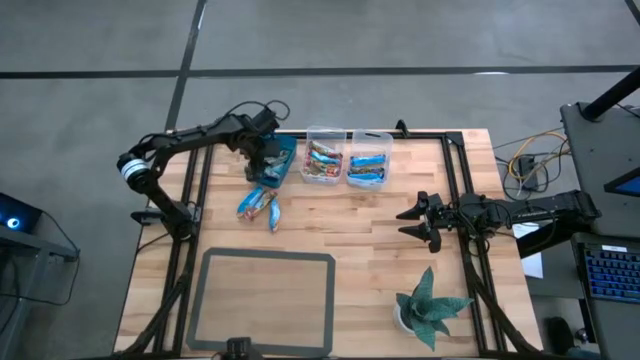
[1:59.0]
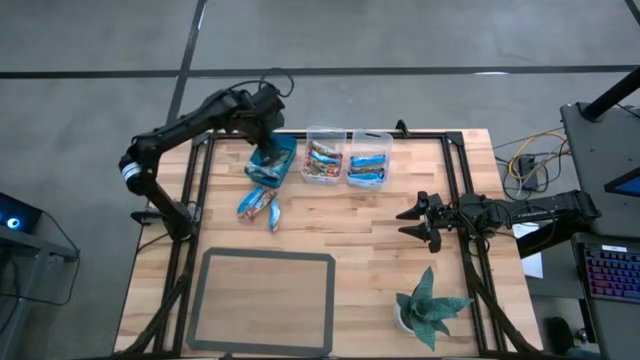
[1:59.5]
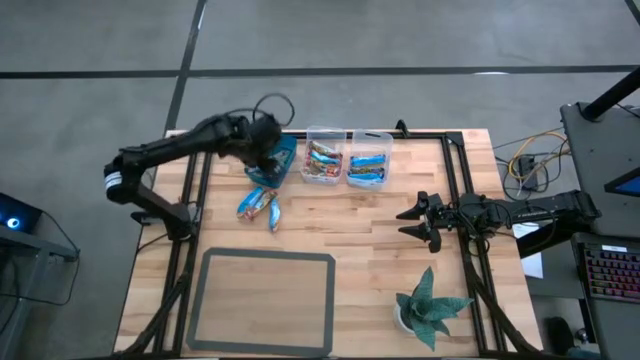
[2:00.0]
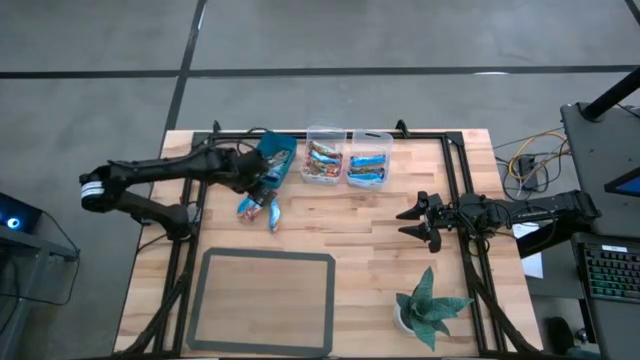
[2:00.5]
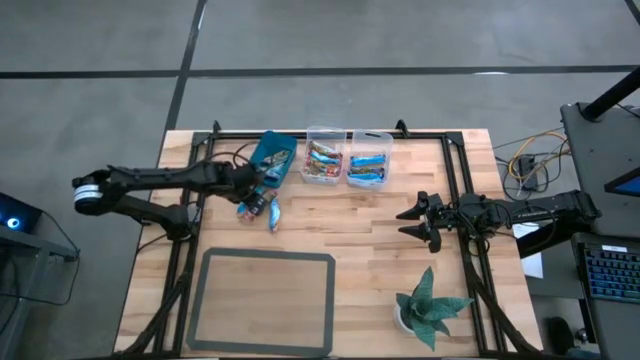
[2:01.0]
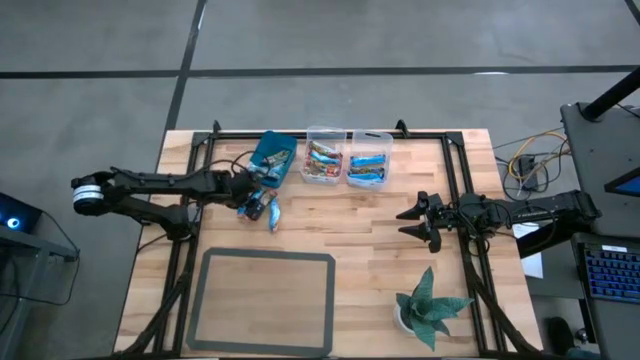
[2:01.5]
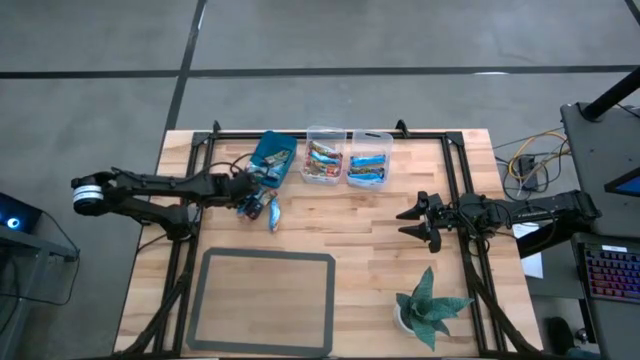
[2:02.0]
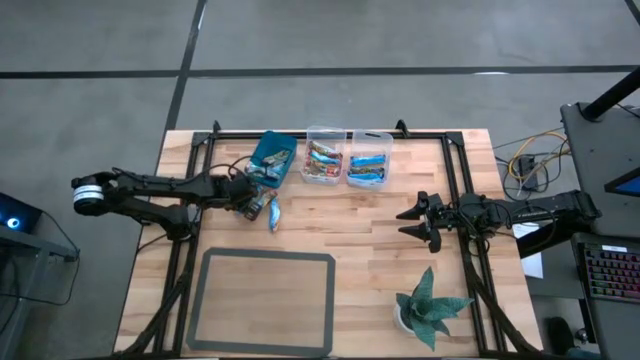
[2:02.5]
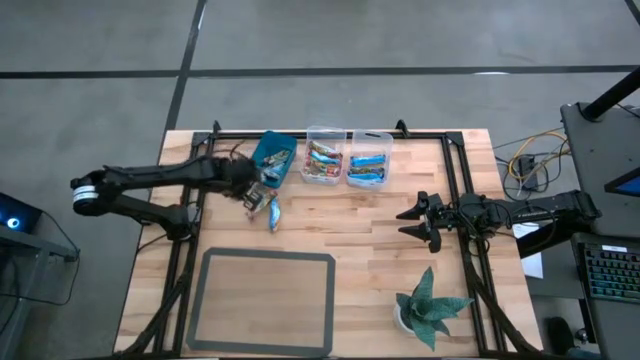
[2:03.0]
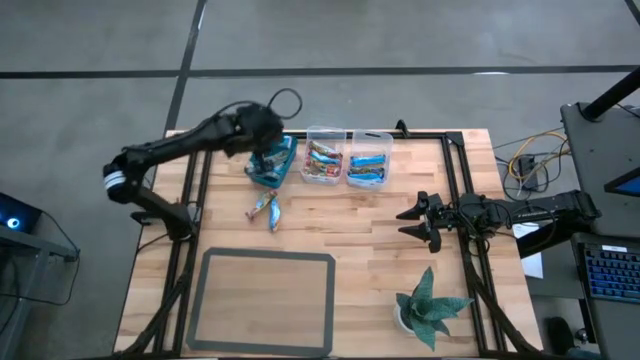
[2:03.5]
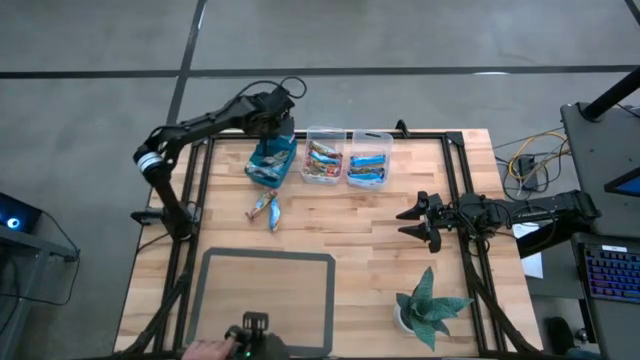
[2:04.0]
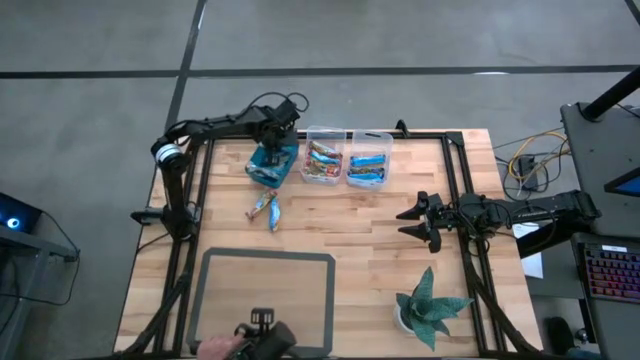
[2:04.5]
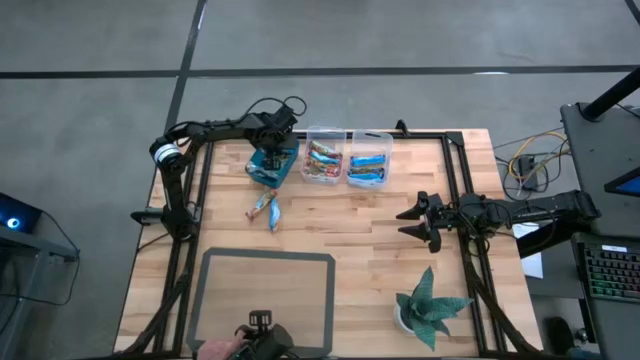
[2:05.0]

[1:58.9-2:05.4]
Task: Pick and place Granola Bars by type
Put the yellow granola bar into the blue bin

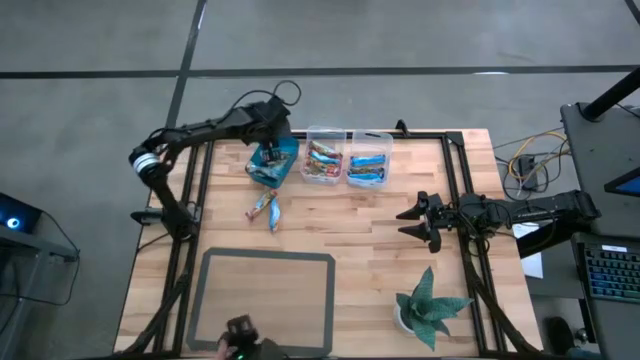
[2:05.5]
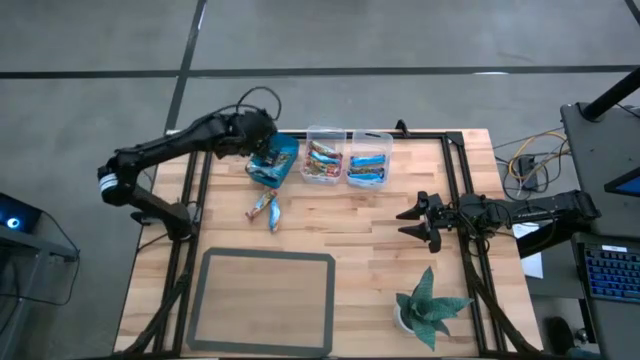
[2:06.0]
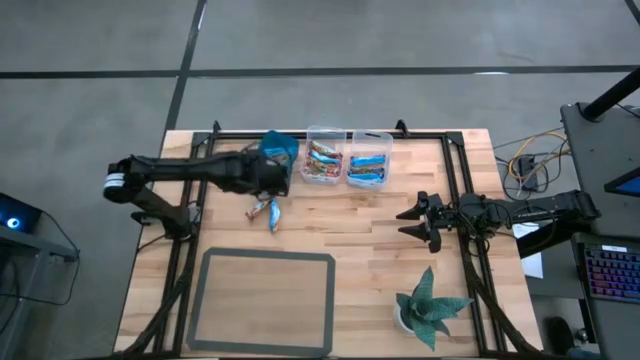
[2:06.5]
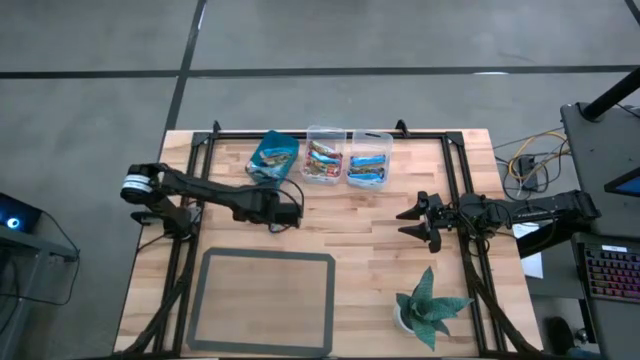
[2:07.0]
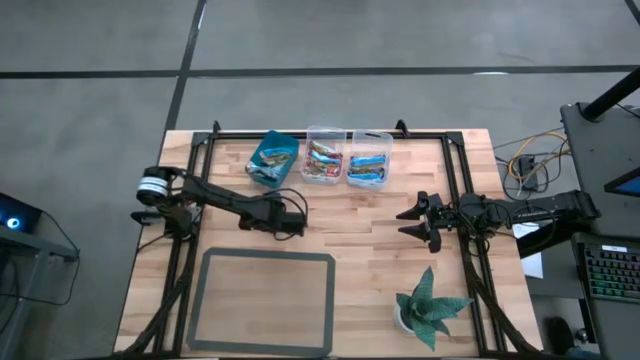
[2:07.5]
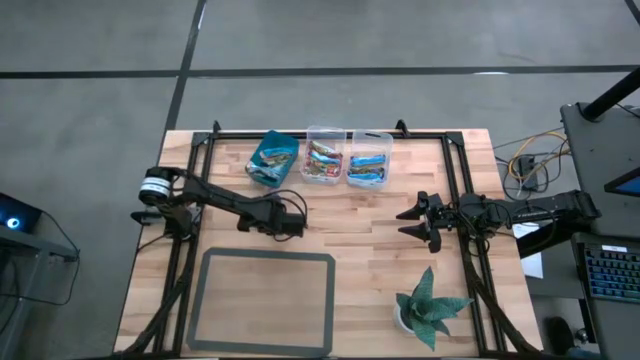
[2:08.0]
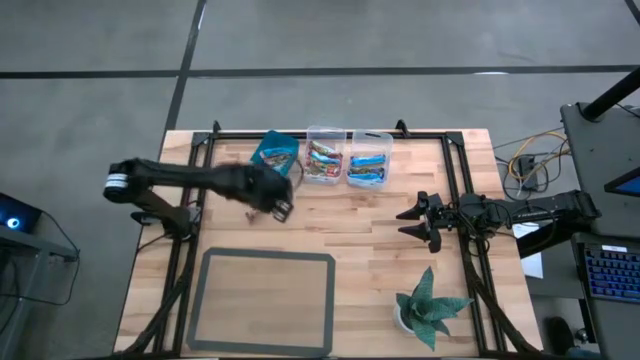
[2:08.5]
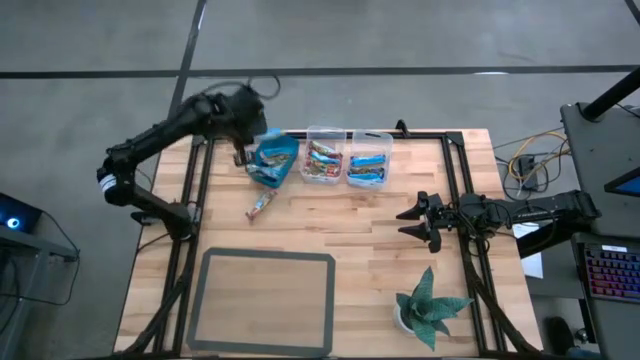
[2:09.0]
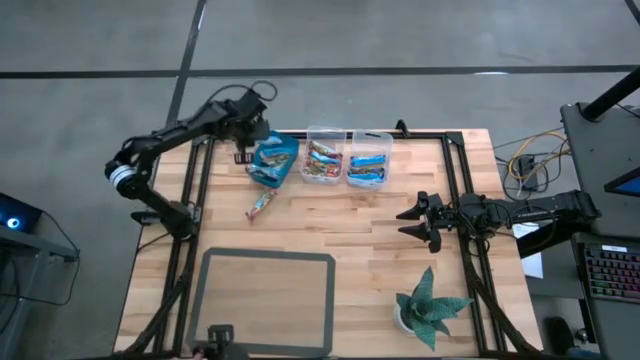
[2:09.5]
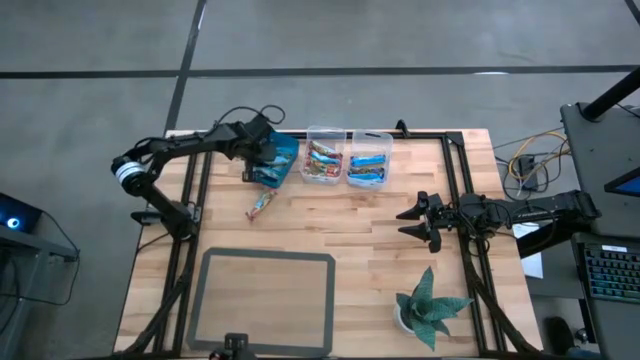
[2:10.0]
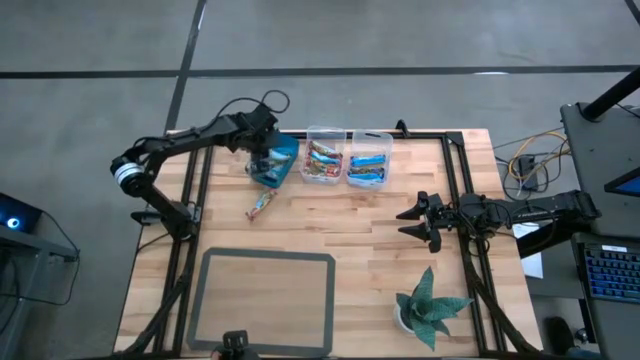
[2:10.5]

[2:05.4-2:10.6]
Put the yellow granola bar into the blue bin

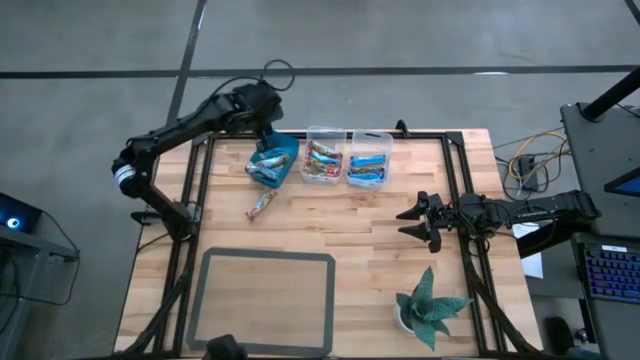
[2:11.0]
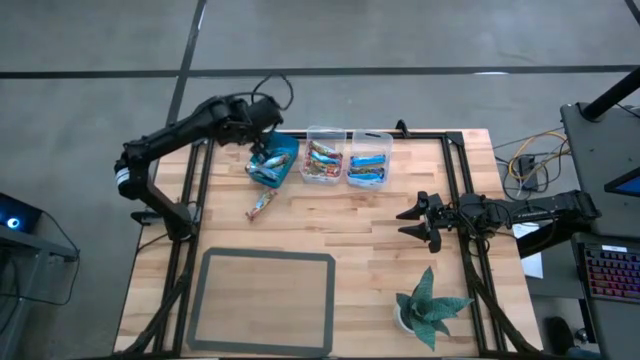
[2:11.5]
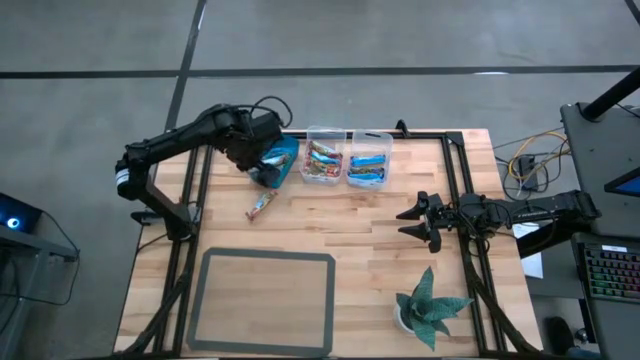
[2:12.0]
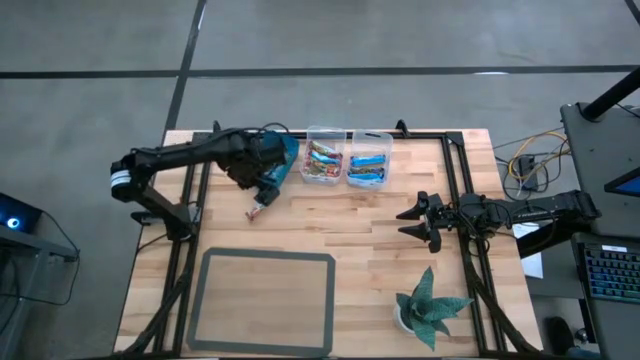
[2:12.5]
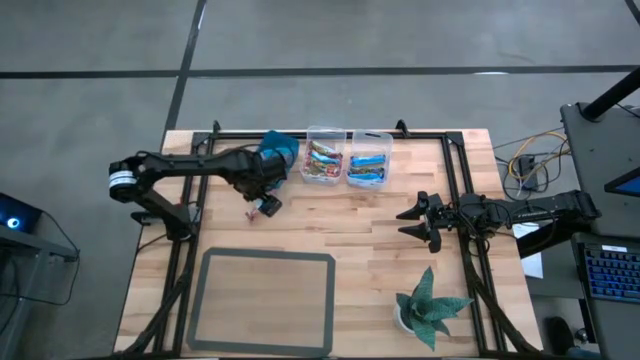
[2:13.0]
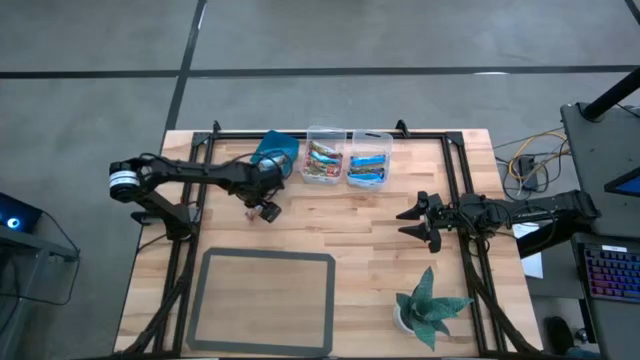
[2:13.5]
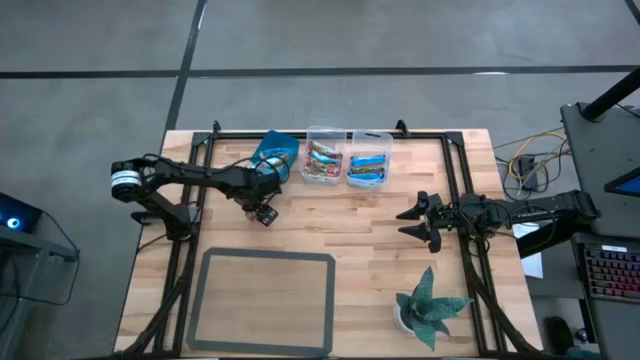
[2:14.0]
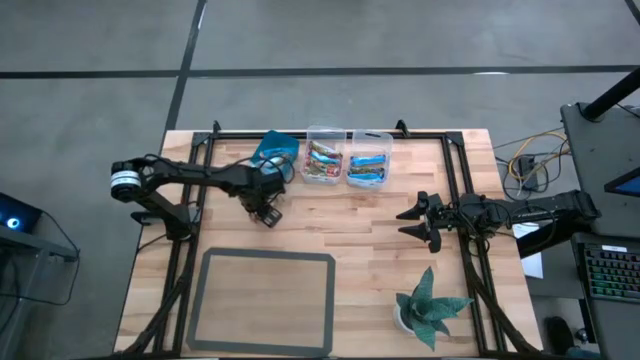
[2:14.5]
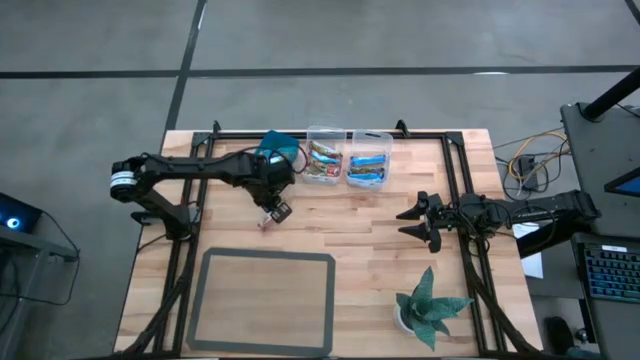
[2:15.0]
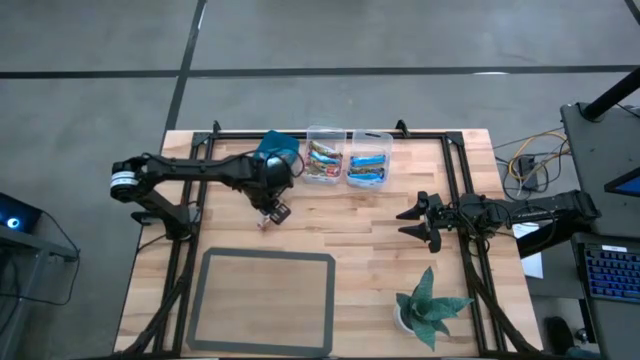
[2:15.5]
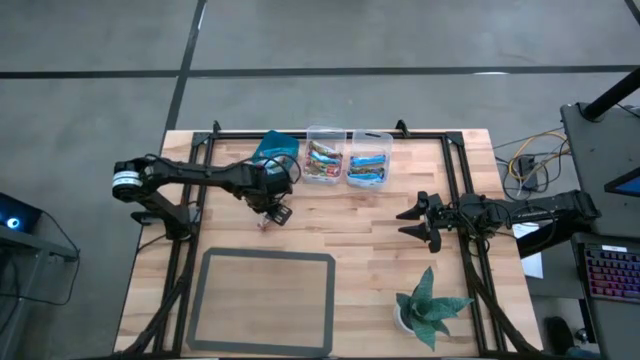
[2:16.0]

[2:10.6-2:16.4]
Put the red granola bar into the left transparent bin

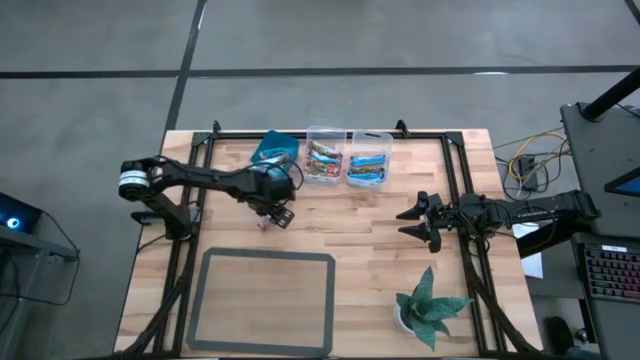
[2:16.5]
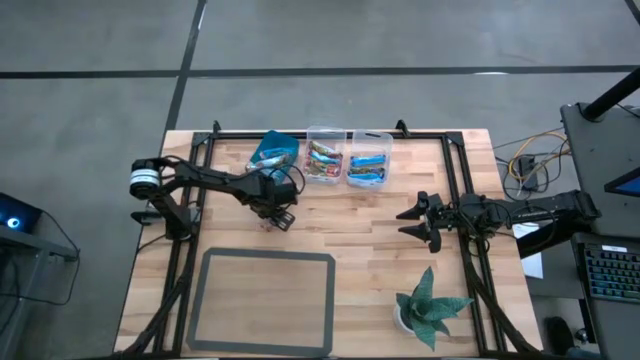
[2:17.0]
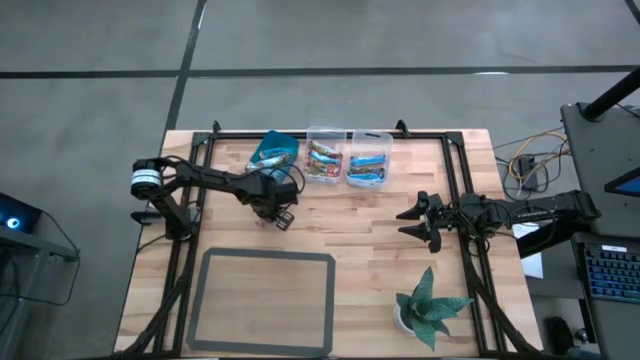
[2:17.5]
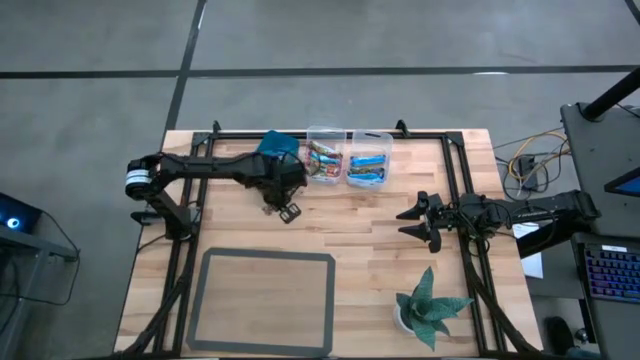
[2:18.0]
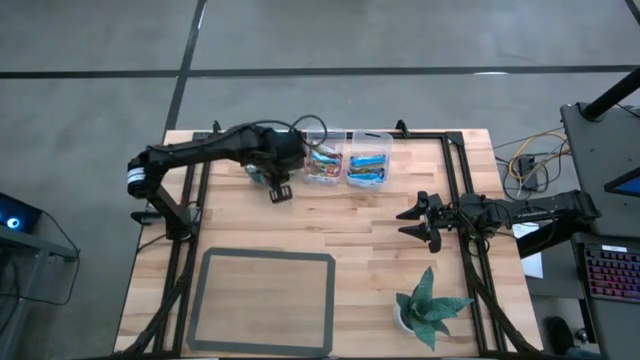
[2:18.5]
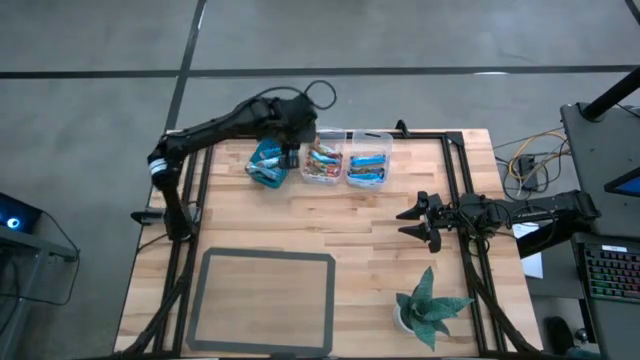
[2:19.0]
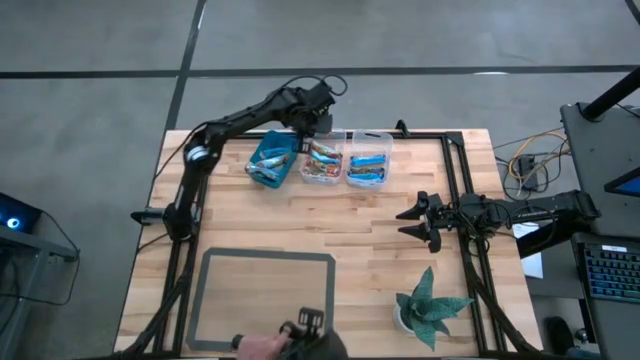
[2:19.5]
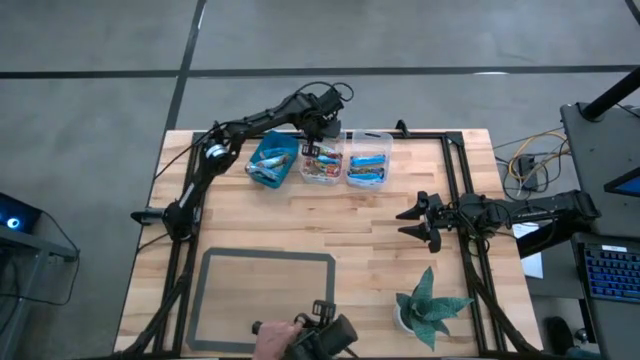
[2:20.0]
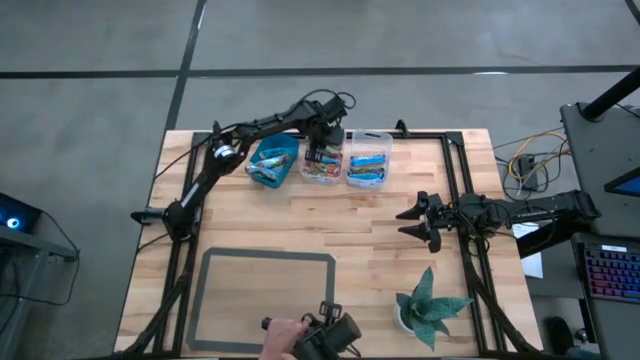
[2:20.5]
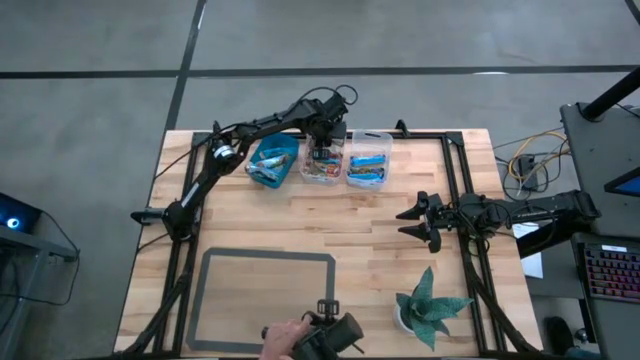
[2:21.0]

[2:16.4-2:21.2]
Put the red granola bar into the left transparent bin
